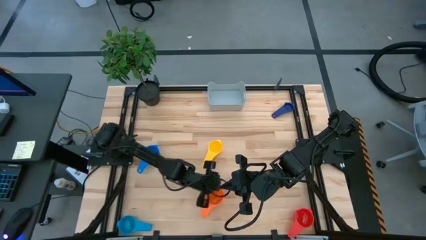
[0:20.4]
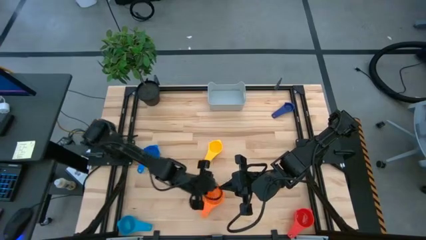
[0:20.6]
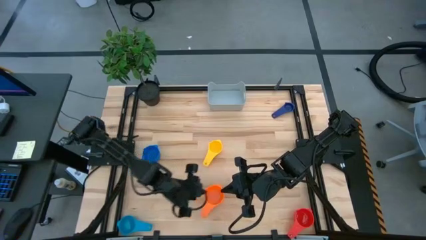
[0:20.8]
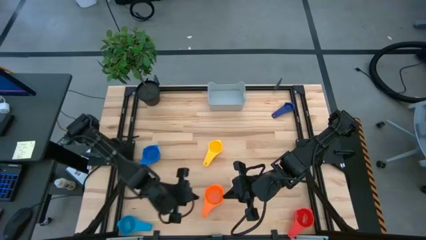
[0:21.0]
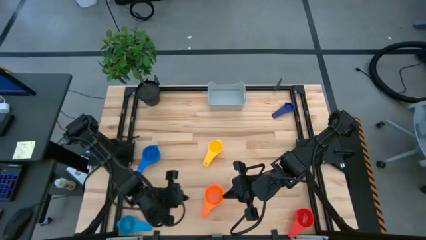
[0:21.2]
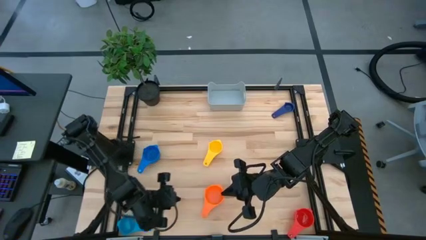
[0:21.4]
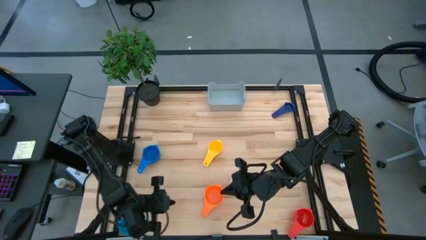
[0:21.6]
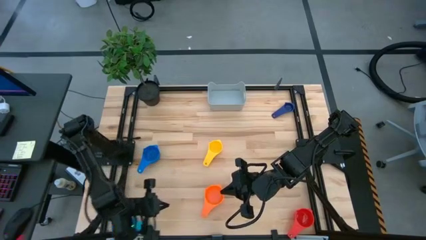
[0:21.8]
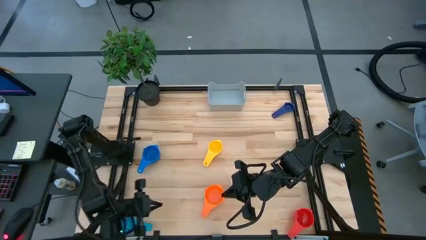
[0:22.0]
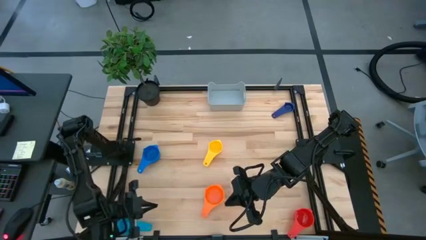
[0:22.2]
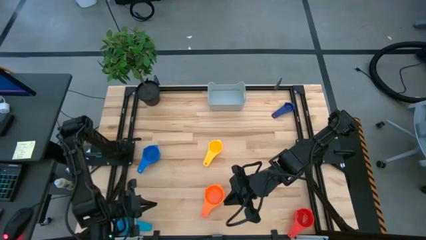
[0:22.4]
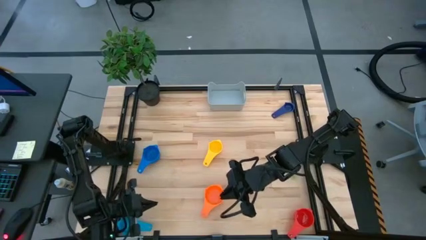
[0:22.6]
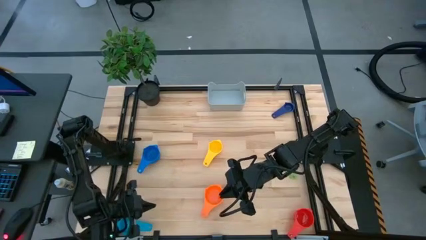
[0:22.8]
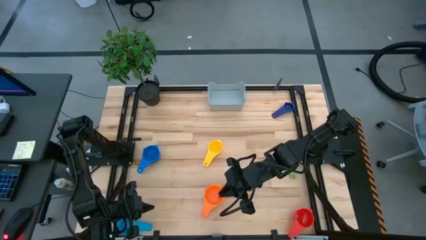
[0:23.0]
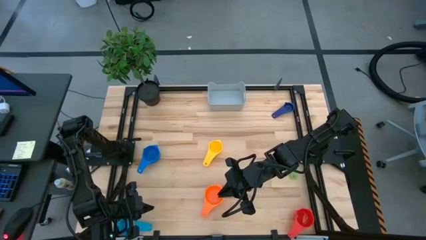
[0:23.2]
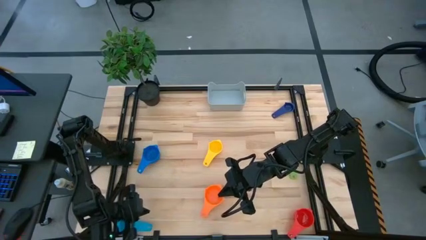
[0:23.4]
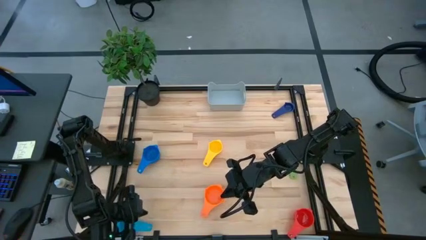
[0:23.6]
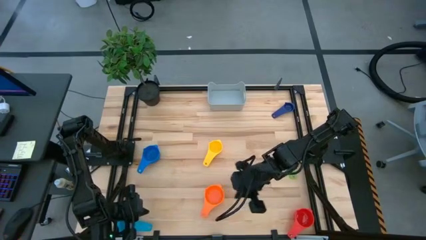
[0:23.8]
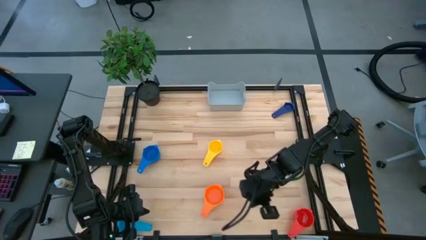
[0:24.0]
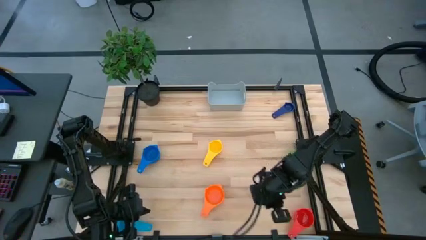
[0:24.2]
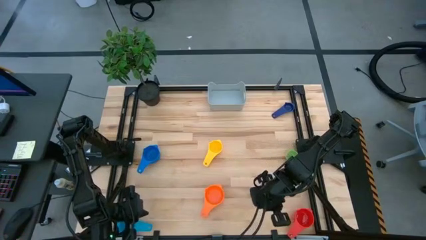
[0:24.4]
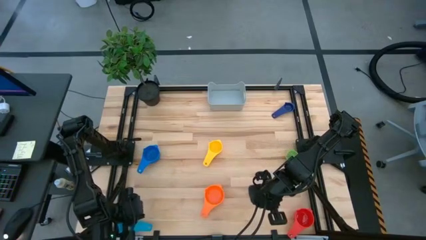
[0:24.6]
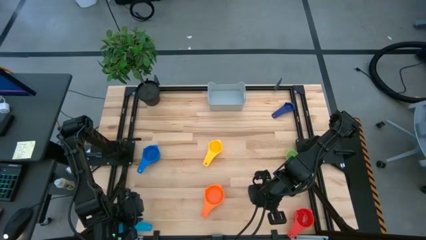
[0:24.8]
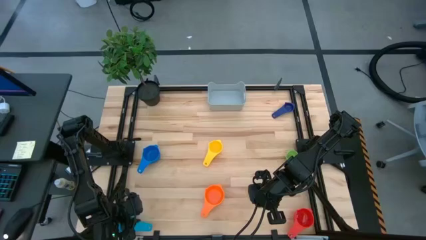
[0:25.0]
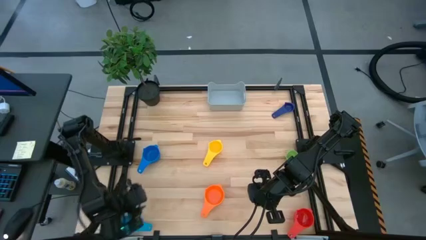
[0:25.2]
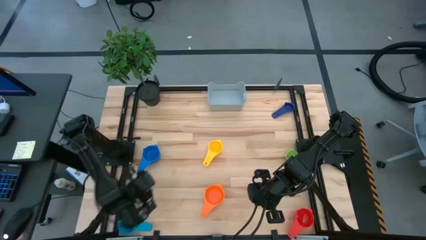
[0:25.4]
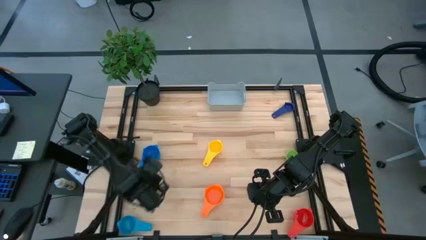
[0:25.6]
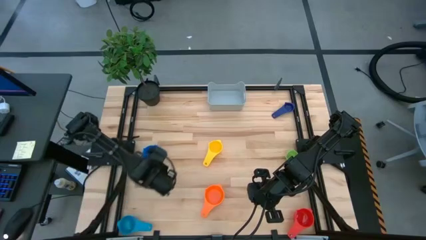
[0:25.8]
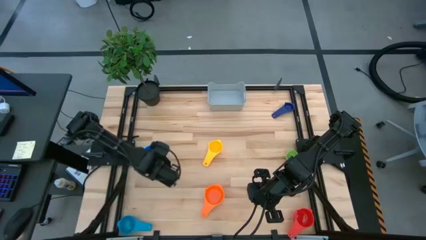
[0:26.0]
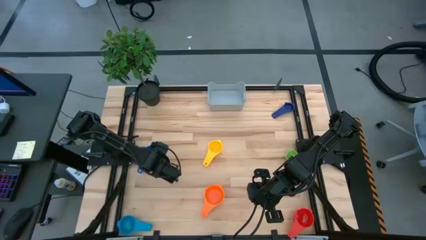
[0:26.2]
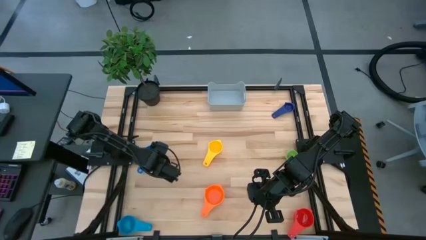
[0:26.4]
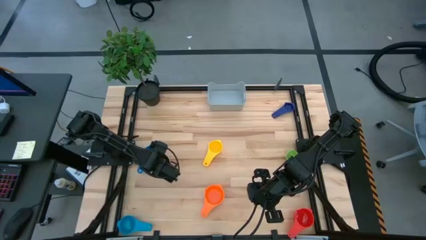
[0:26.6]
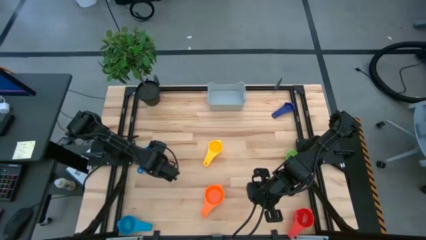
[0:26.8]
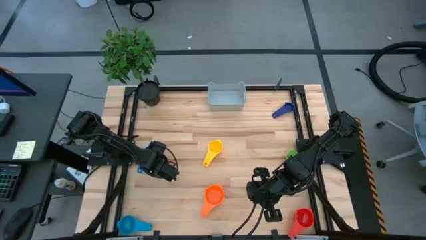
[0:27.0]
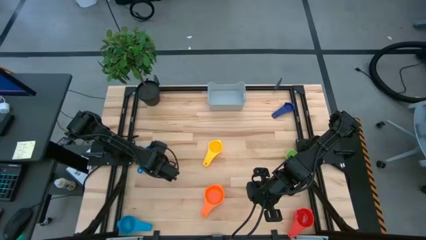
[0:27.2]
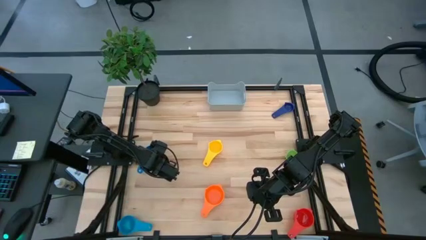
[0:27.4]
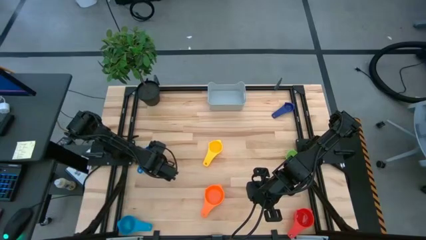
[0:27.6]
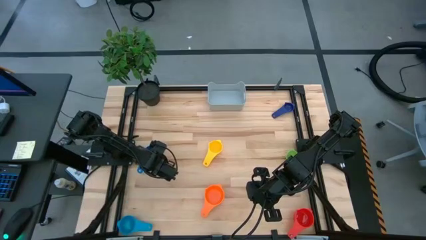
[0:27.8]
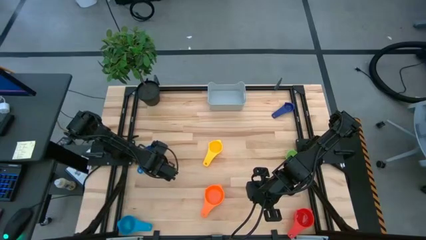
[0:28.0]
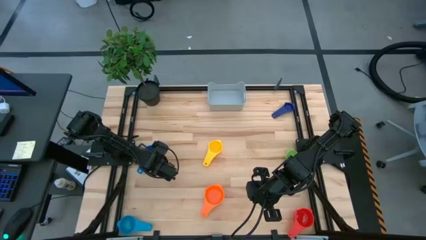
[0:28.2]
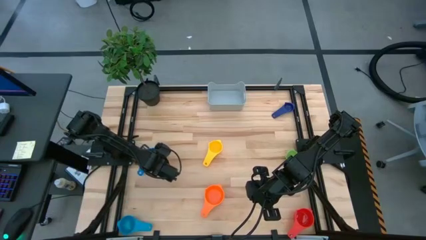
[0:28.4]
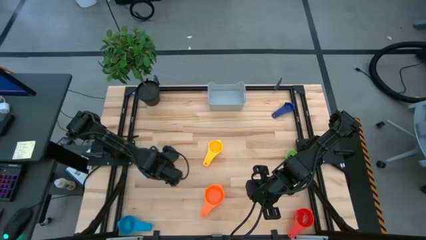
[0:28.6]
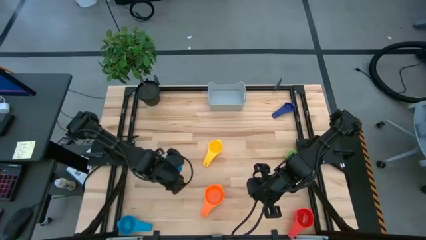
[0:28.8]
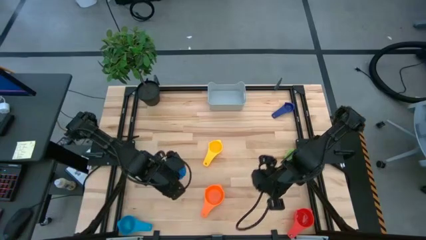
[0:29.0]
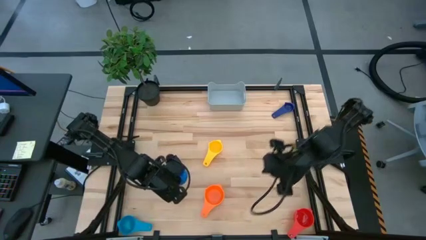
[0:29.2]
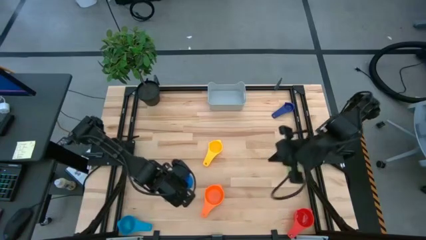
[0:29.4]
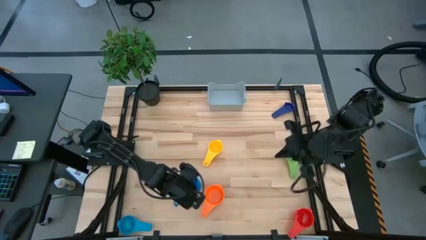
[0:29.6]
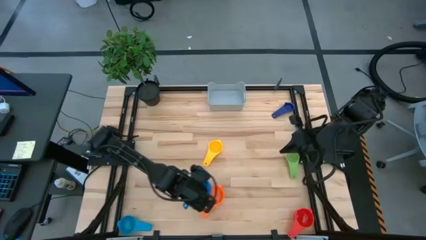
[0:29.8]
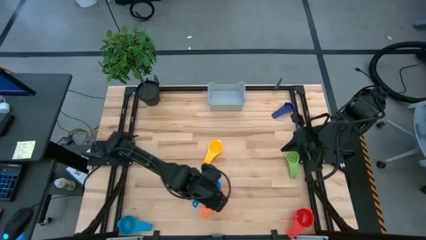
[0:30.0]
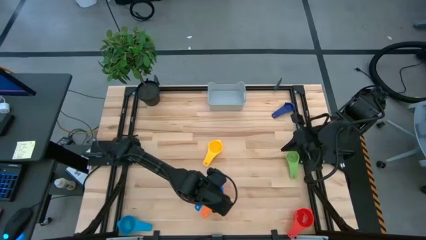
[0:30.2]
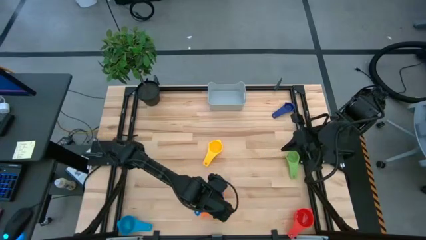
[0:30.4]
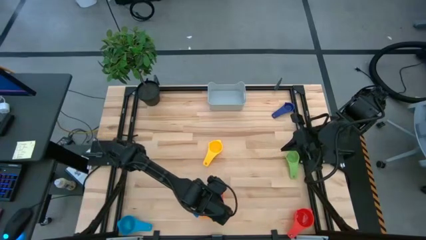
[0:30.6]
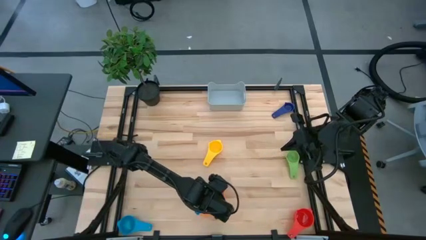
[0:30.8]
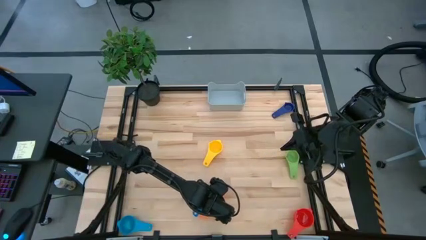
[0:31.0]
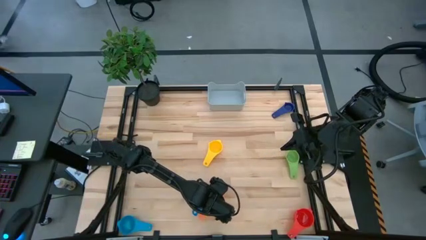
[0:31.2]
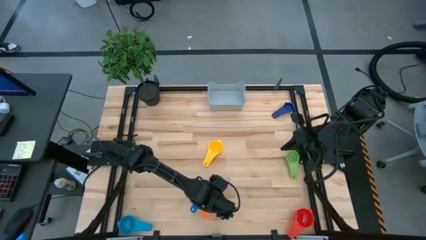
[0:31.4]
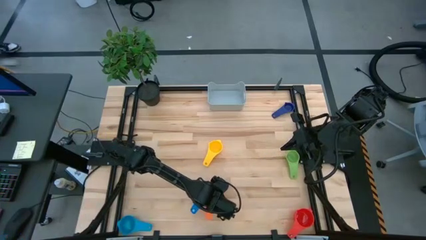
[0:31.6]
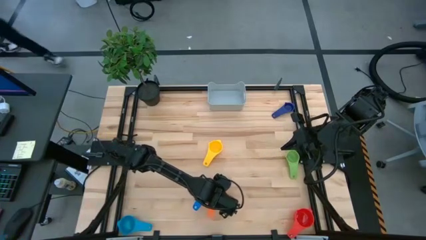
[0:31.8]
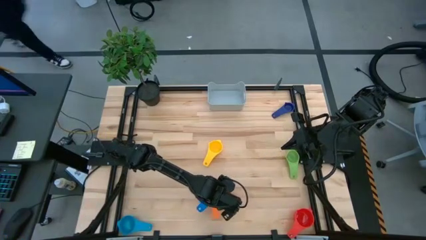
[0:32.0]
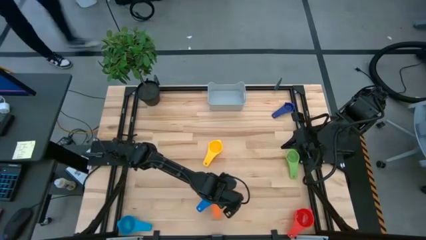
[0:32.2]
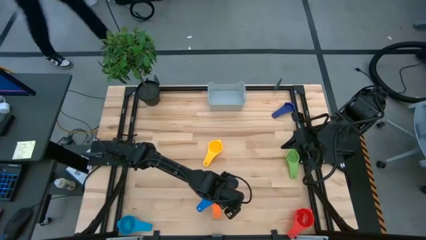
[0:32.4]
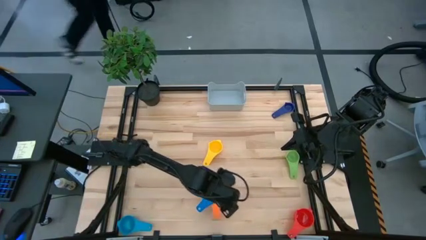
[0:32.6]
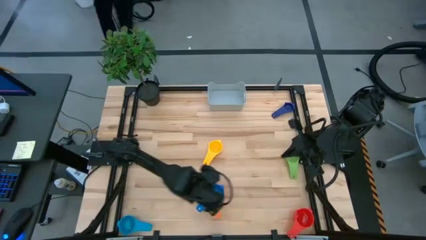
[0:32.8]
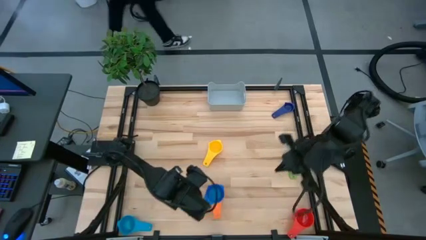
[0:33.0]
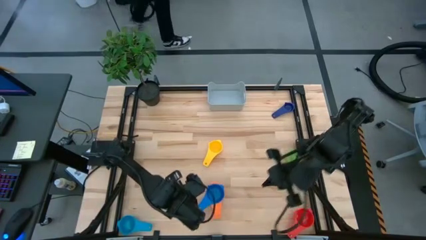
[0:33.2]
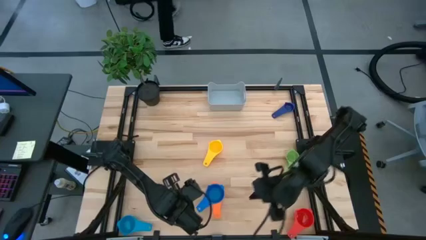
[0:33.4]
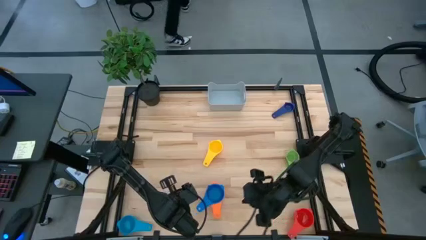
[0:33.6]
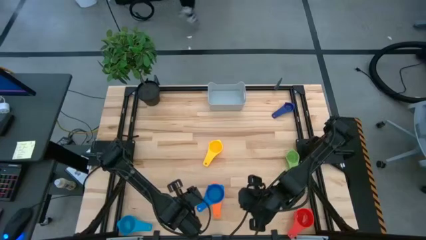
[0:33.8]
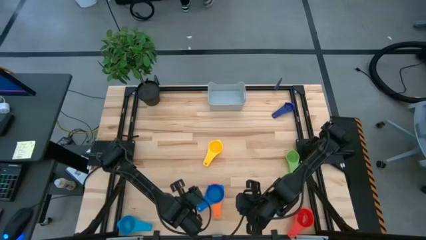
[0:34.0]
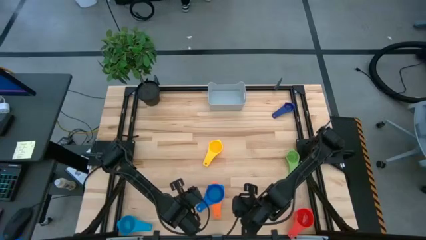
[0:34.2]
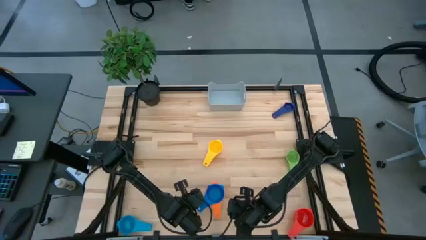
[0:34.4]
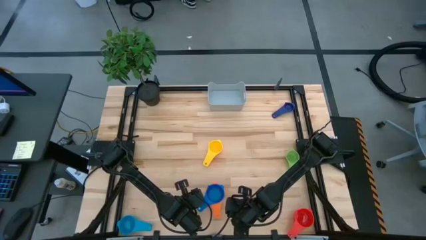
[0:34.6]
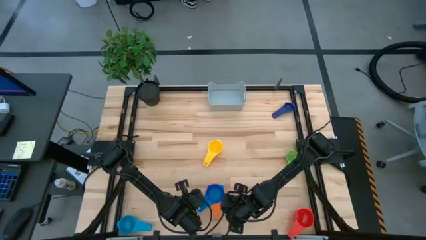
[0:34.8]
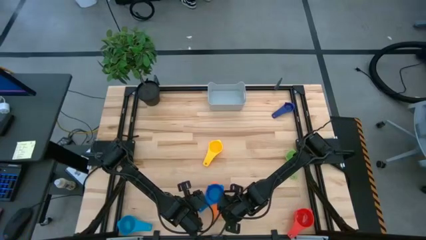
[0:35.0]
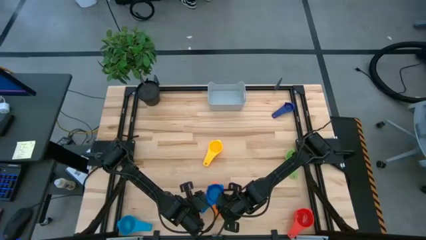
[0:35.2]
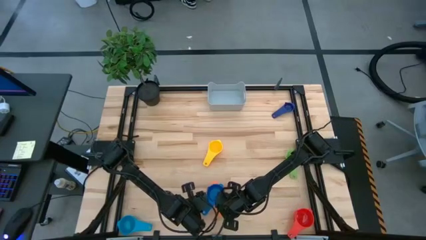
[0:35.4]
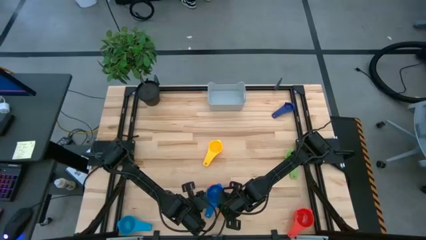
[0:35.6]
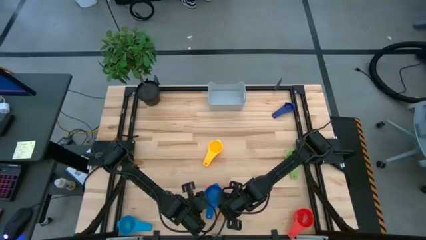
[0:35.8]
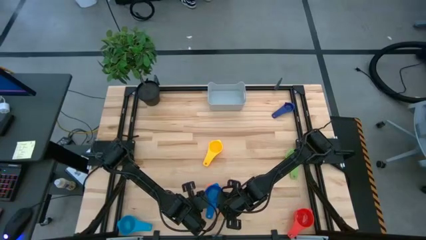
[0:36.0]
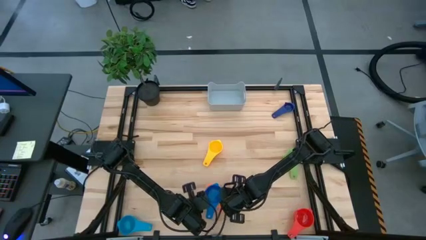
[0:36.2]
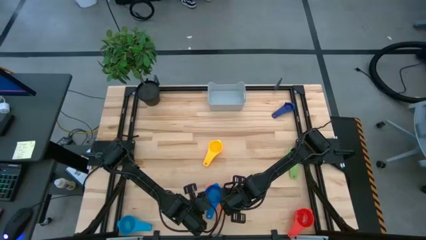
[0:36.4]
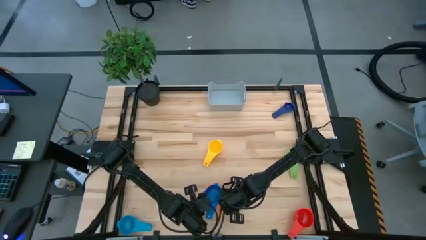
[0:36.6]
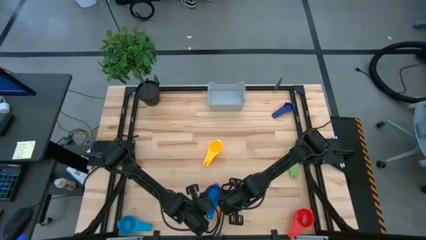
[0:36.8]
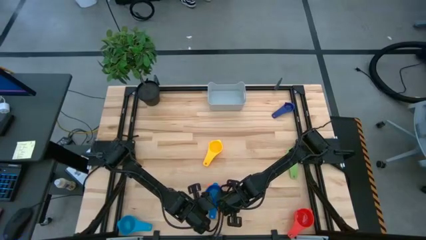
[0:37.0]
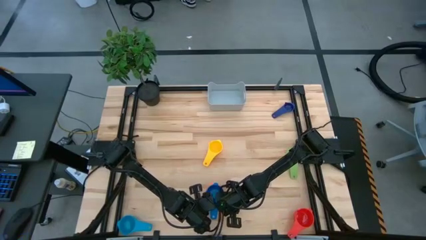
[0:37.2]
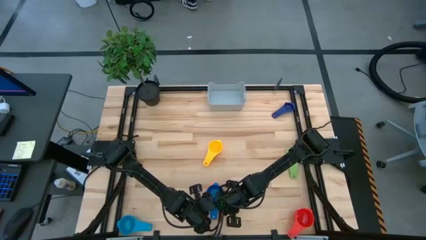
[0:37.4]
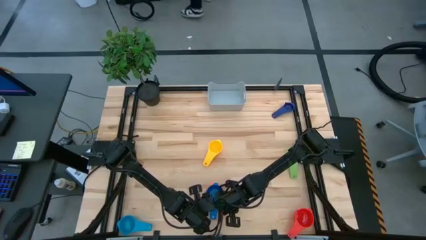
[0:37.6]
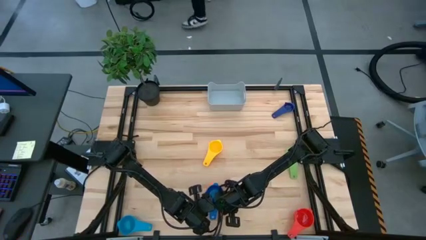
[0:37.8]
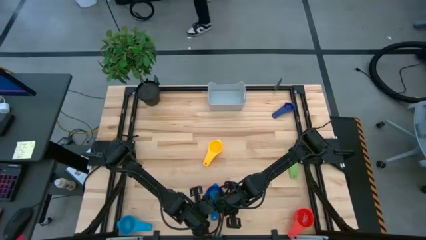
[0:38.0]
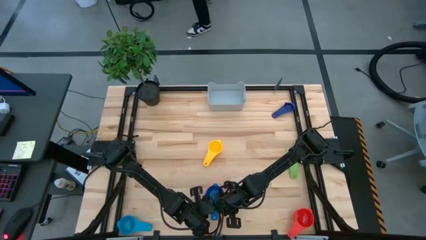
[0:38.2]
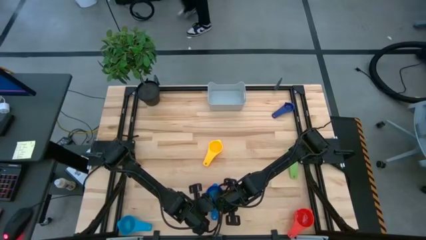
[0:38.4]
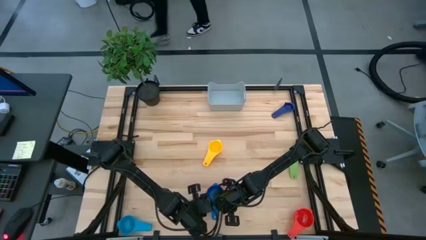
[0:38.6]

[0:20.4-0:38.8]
Task: Nest measuring cups in basket
Stack the blue measuring cup on top of the orange measuring cup
